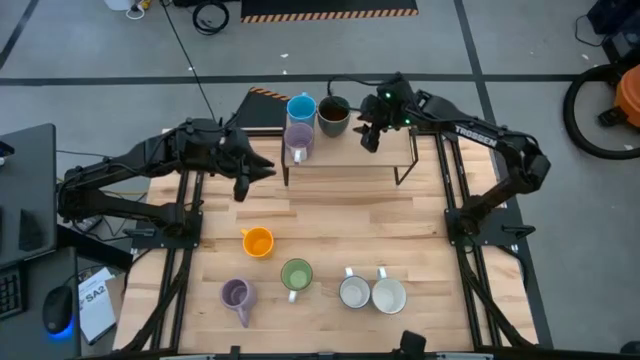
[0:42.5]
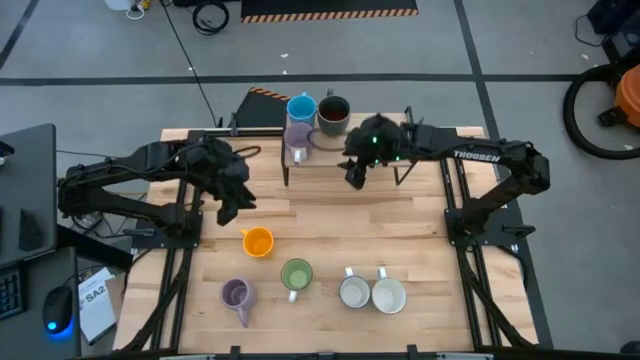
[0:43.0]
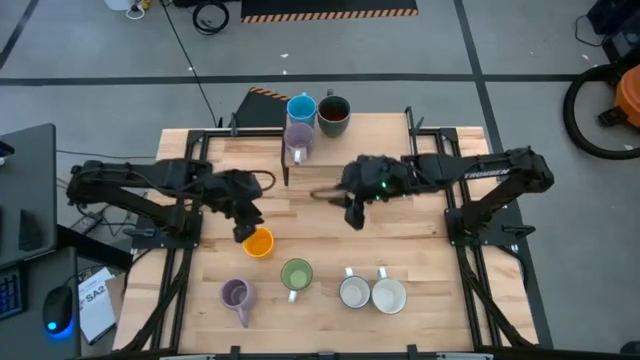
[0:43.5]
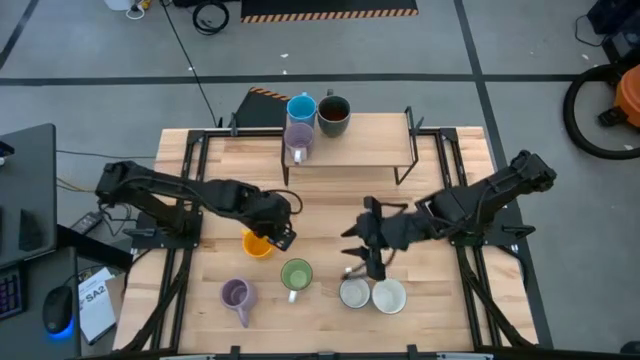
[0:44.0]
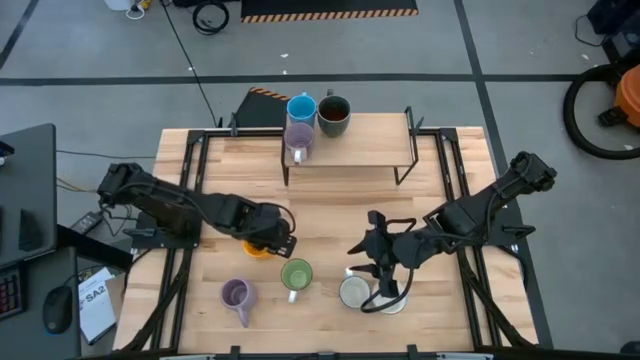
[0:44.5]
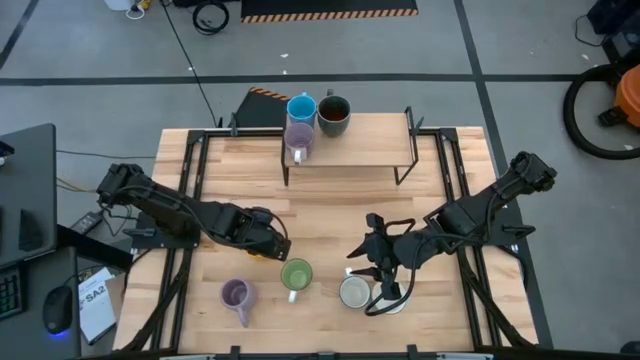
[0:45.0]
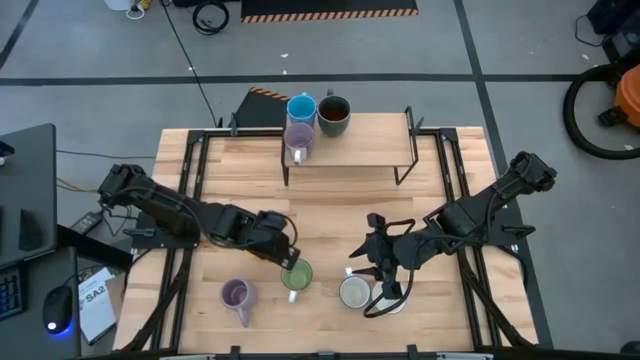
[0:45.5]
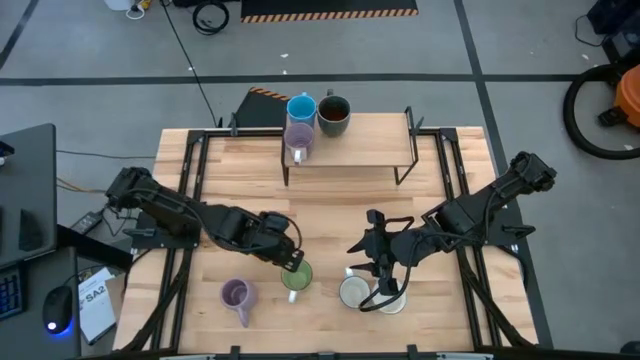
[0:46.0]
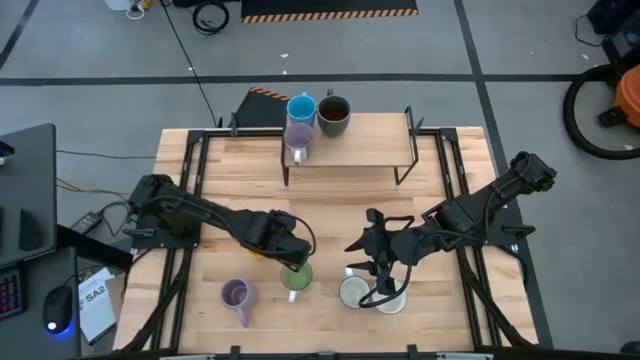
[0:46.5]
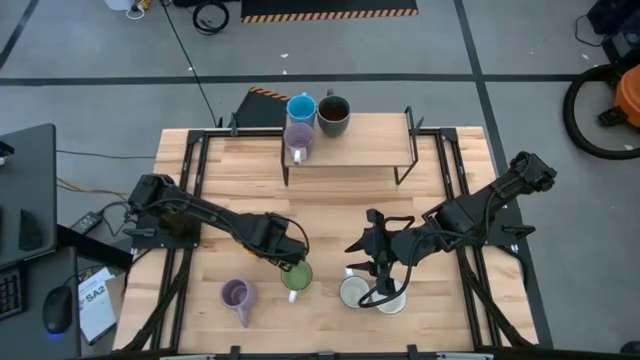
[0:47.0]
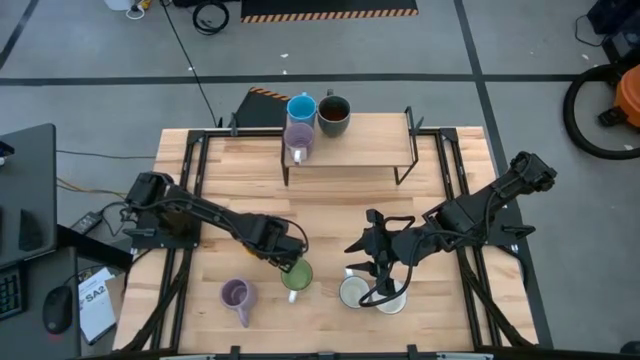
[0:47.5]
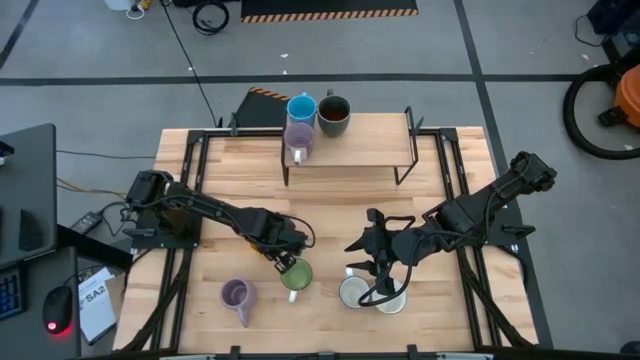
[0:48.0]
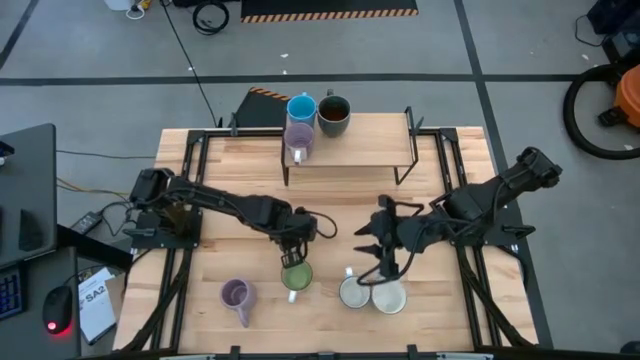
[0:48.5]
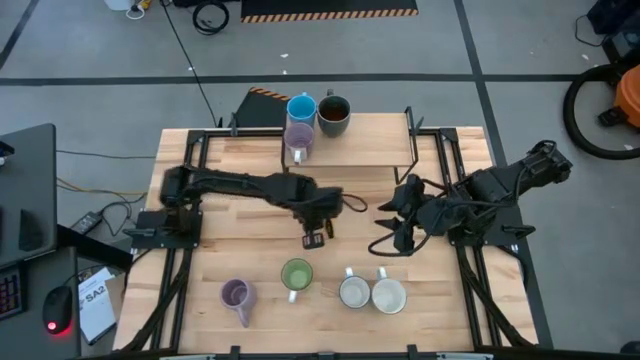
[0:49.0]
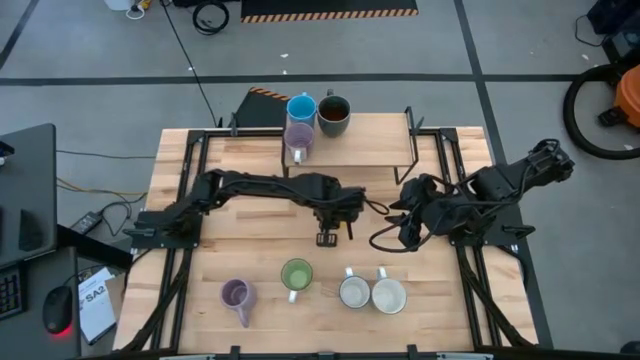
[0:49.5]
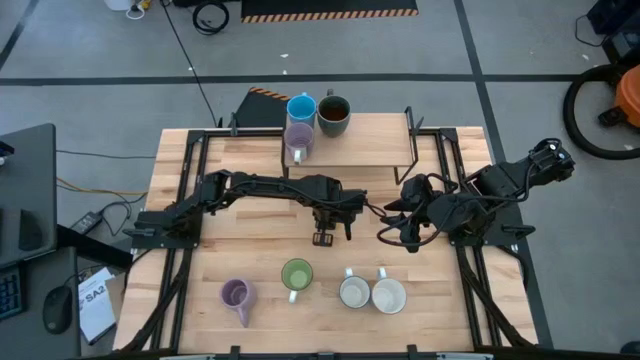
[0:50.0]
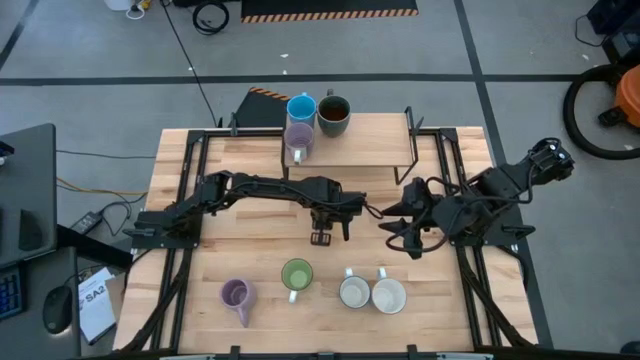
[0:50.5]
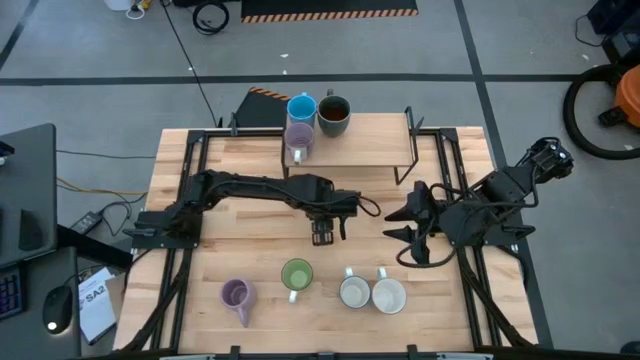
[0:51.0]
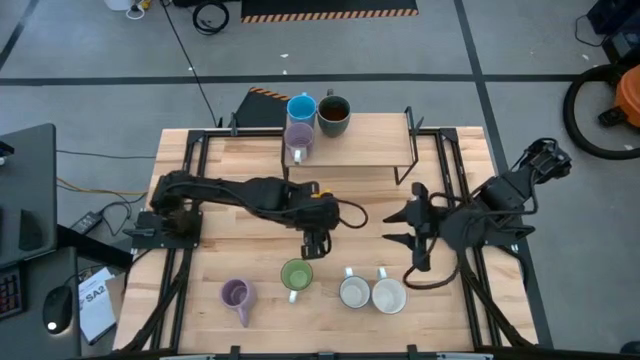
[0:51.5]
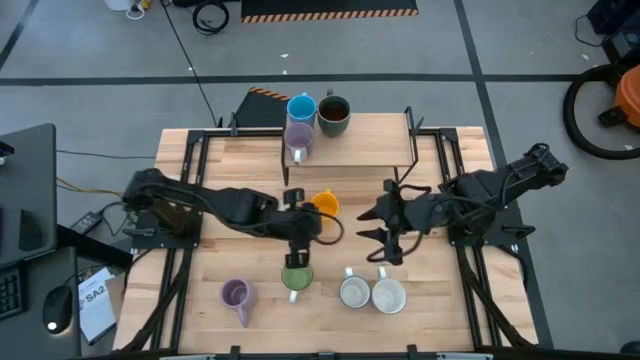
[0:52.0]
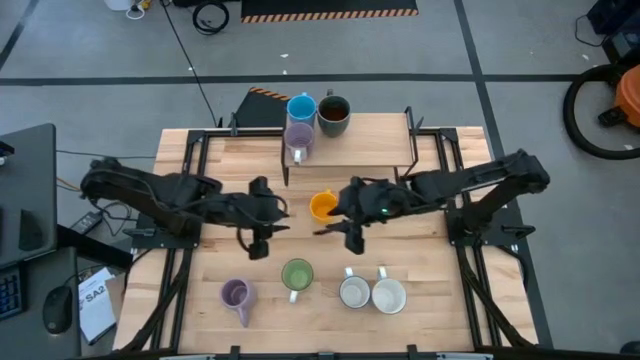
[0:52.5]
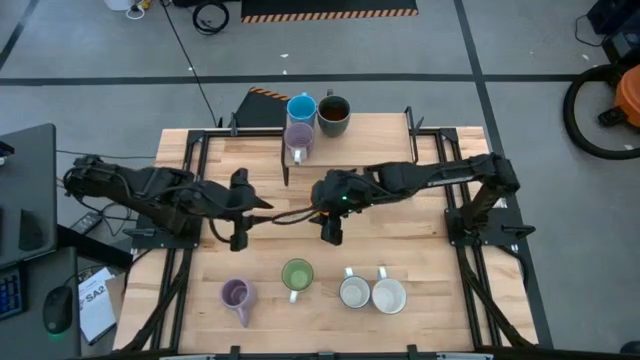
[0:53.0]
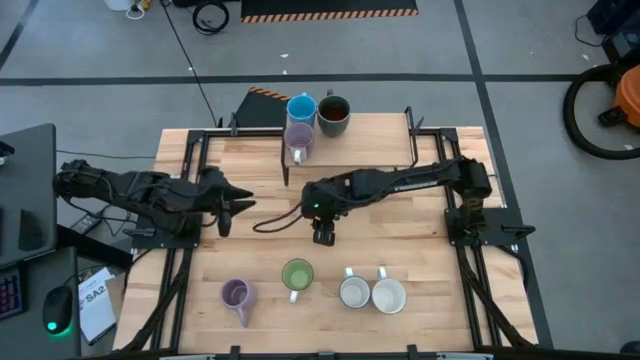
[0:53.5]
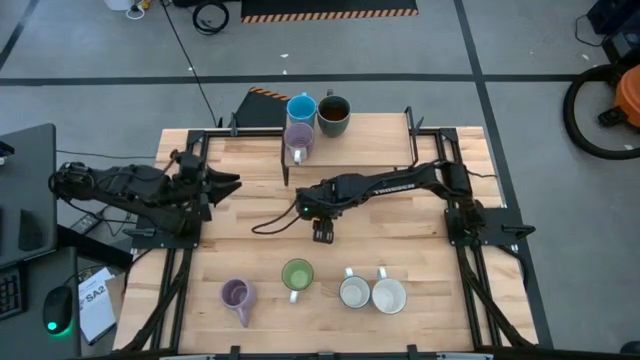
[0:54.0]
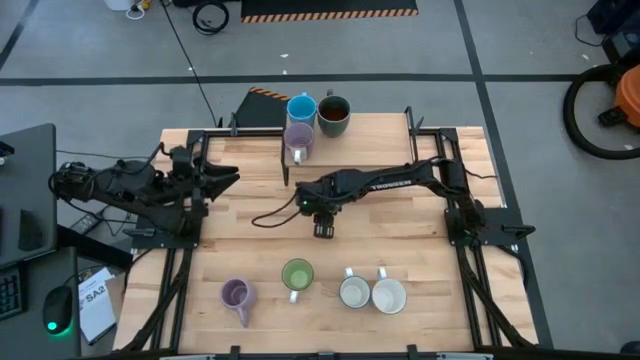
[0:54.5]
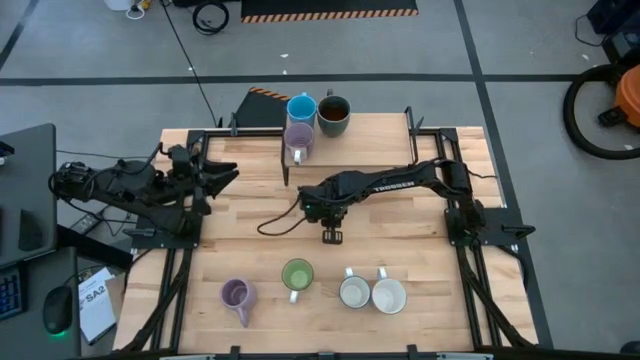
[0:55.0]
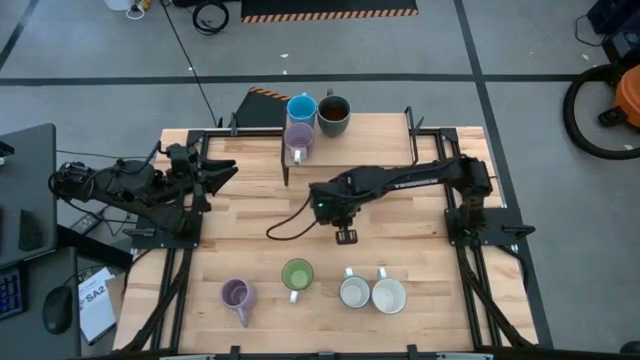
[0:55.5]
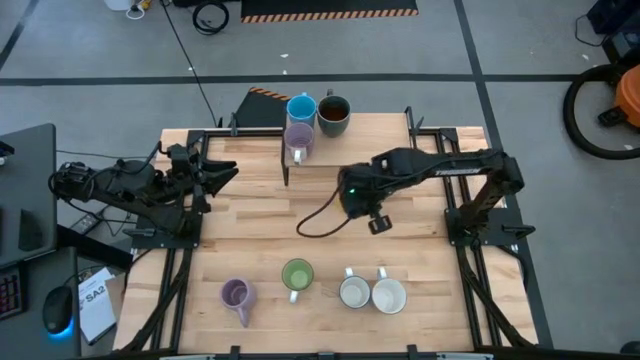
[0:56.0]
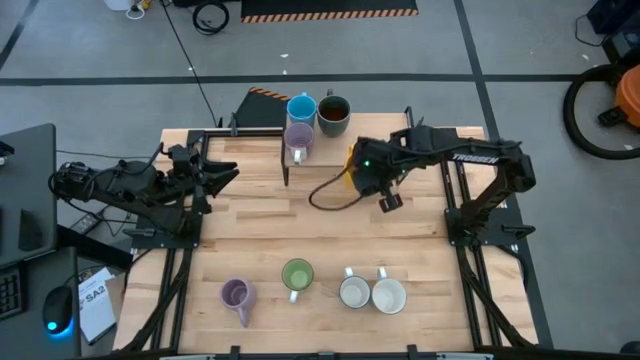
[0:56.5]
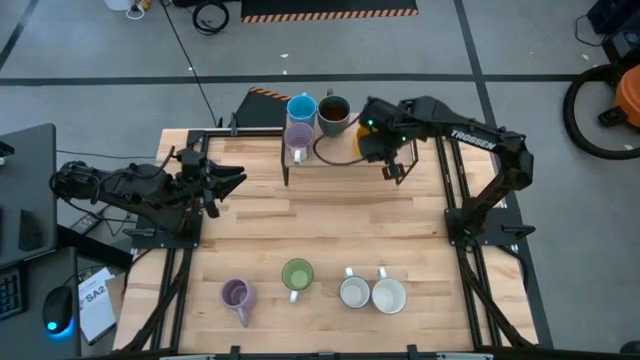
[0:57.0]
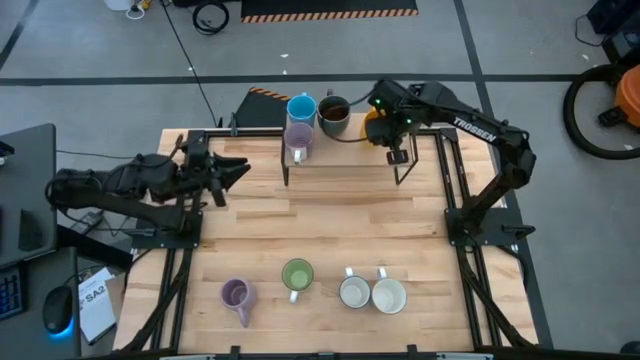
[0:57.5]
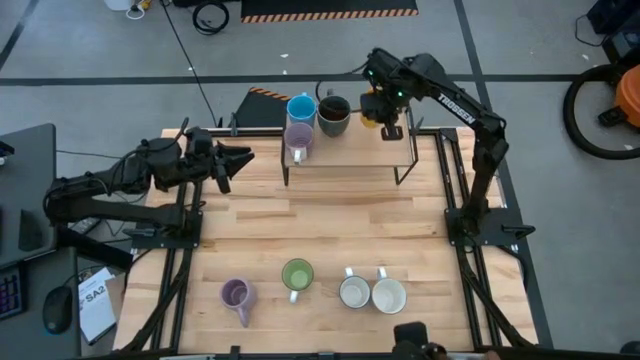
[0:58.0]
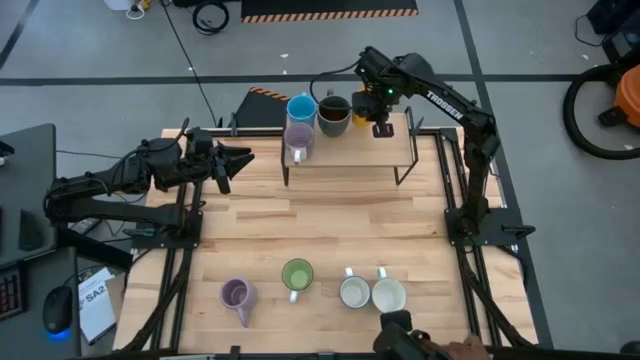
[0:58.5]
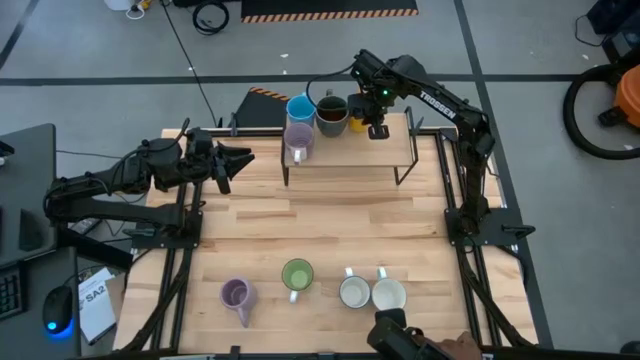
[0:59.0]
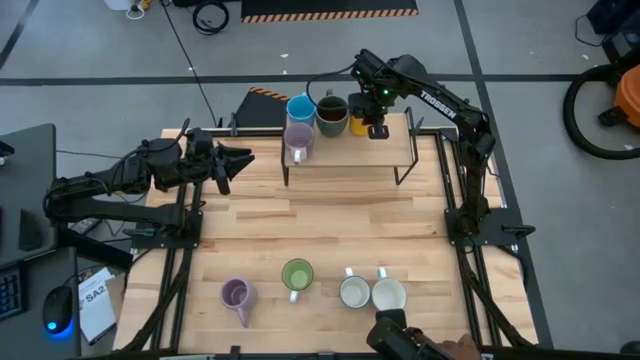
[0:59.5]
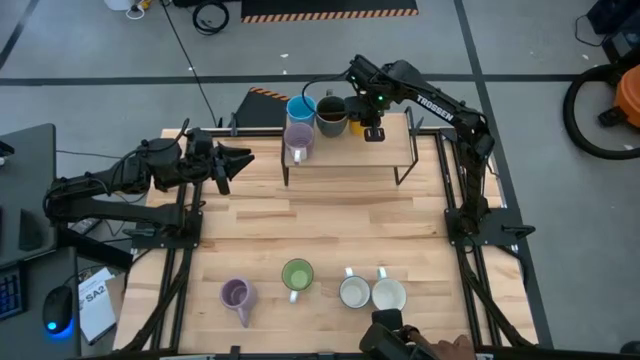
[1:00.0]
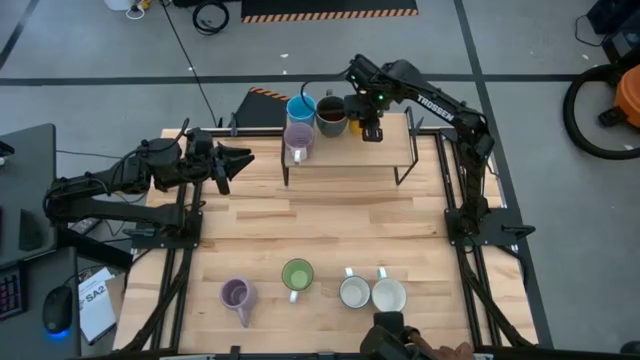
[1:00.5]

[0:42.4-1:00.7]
Task: Place coffee mugs
Put the yellow mug on the shelf

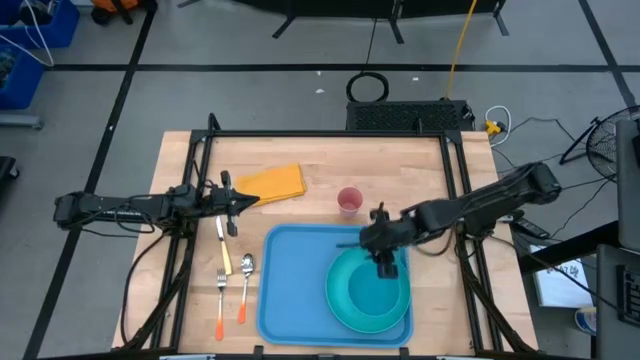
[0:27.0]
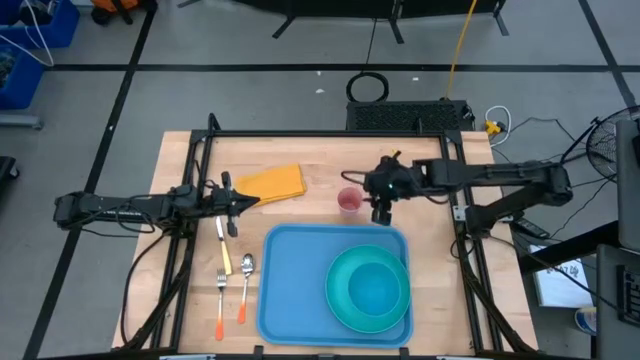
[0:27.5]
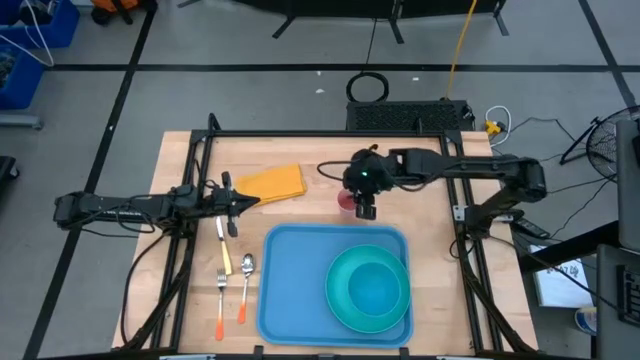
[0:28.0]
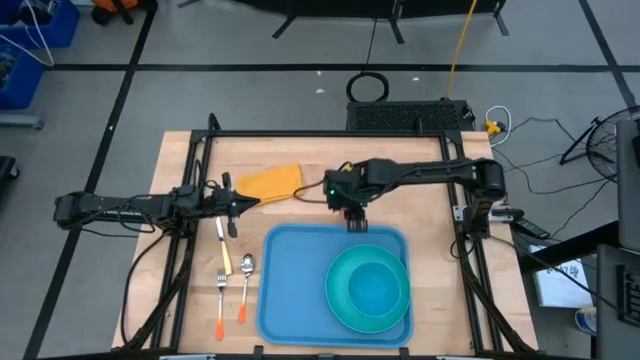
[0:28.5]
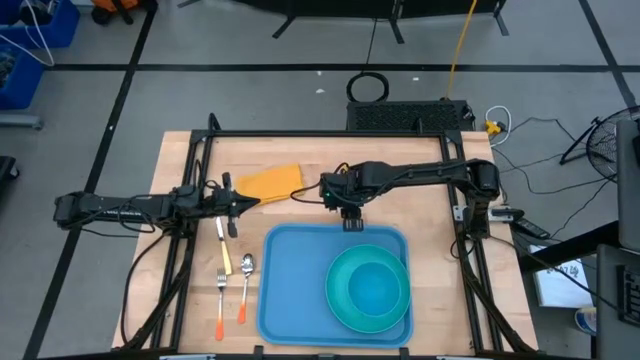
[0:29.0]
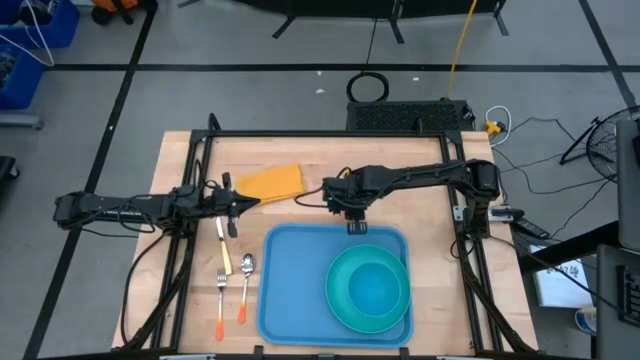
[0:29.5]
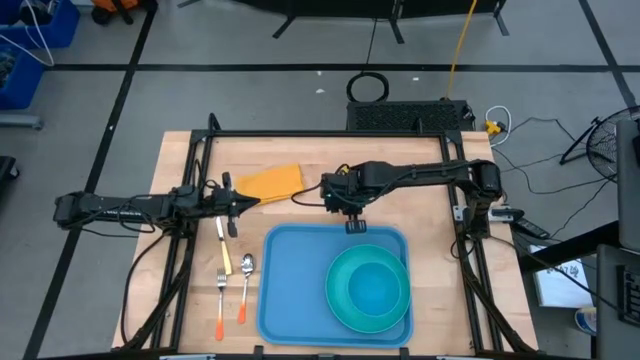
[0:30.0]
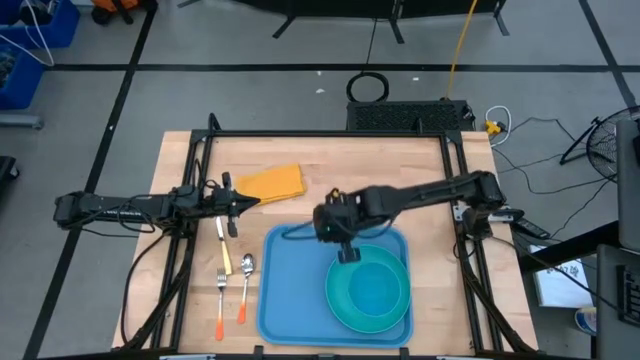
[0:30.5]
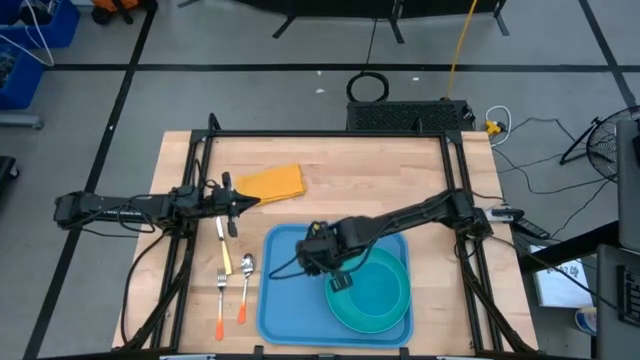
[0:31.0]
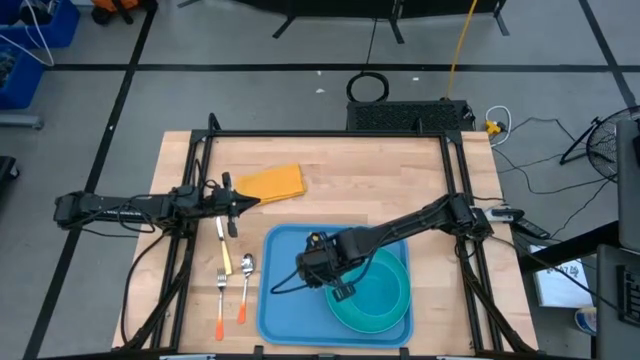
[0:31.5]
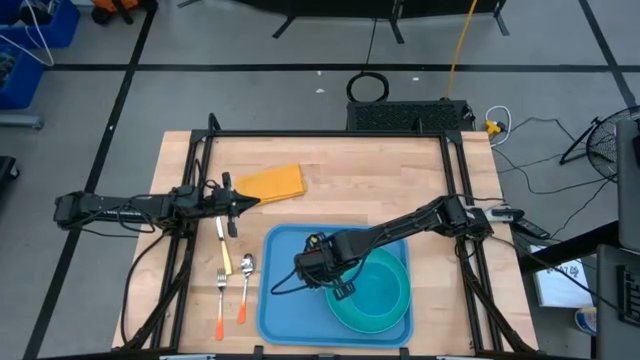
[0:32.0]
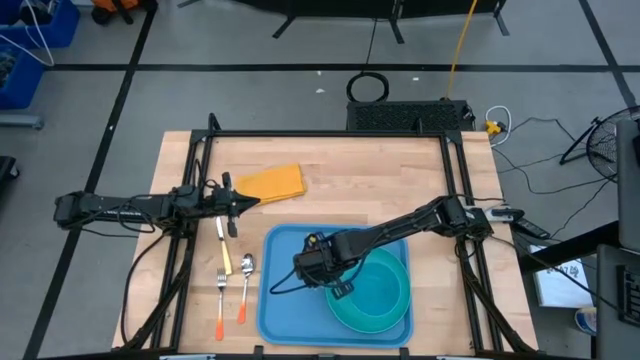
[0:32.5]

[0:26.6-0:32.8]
Task: Set up tray
Put the pink cup on the tray to the top left of the blue plate
